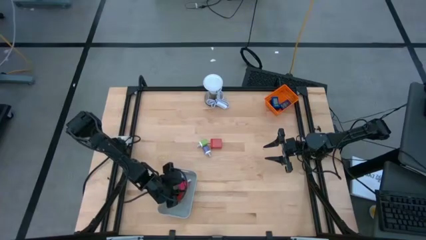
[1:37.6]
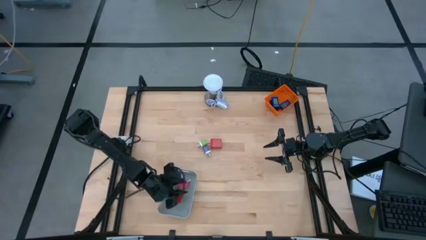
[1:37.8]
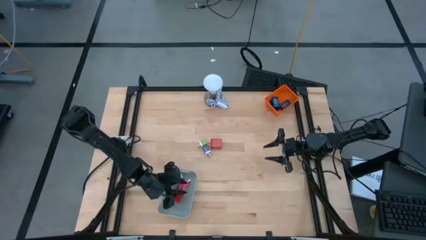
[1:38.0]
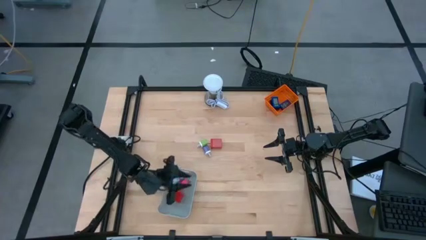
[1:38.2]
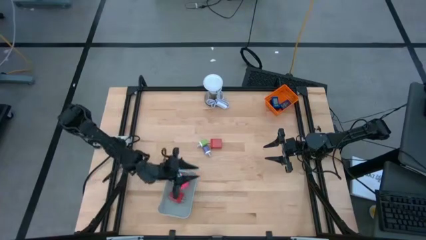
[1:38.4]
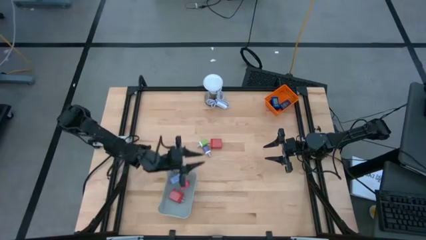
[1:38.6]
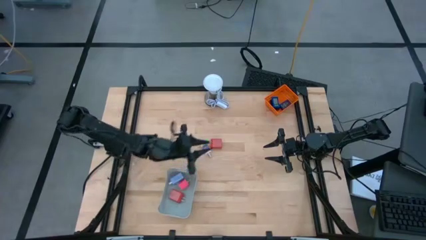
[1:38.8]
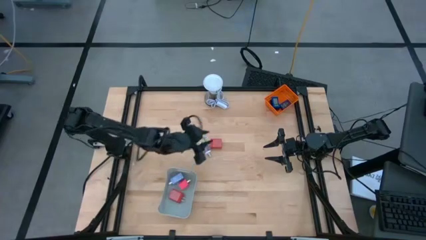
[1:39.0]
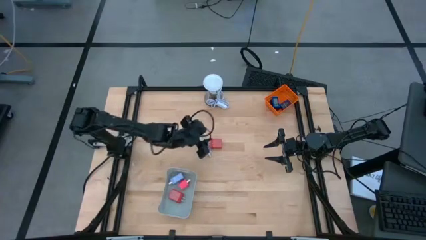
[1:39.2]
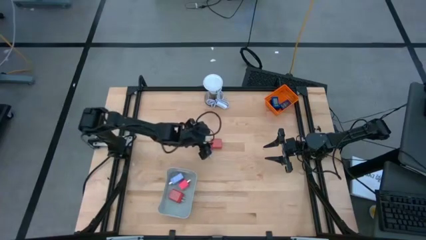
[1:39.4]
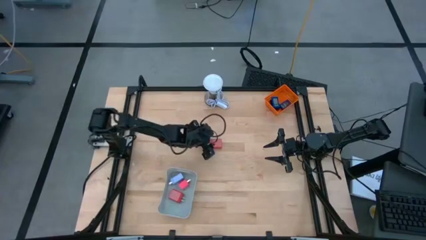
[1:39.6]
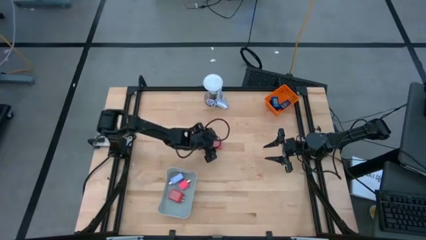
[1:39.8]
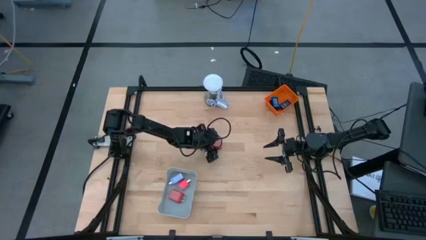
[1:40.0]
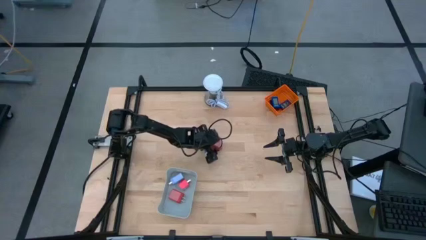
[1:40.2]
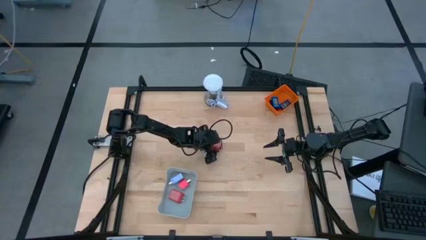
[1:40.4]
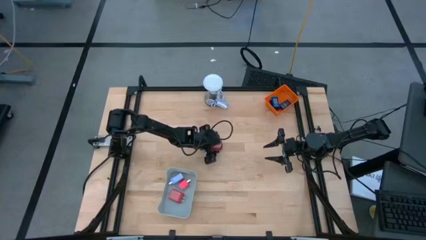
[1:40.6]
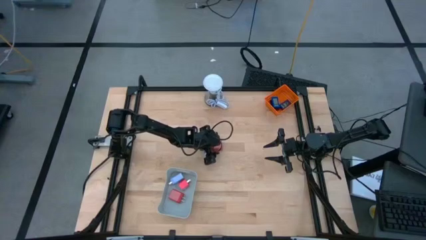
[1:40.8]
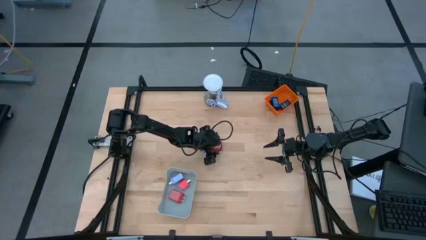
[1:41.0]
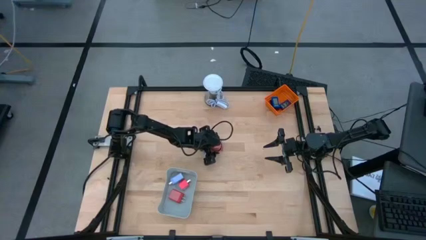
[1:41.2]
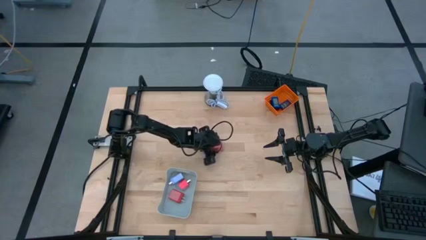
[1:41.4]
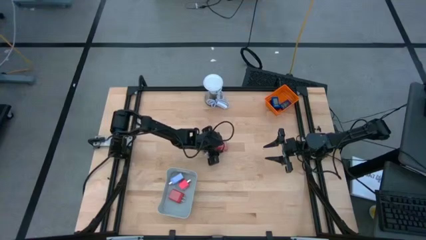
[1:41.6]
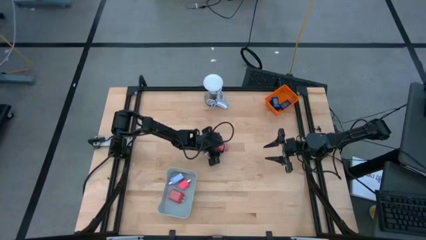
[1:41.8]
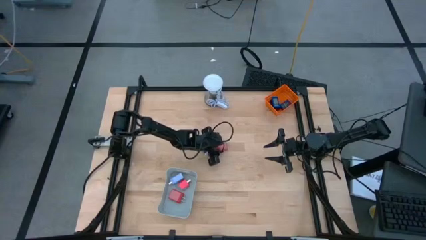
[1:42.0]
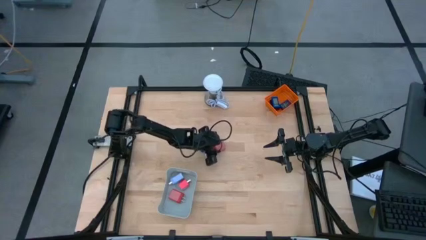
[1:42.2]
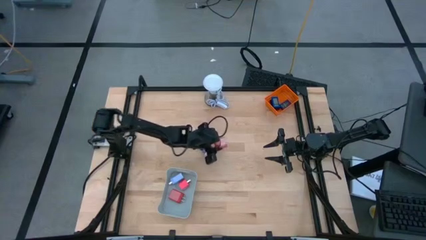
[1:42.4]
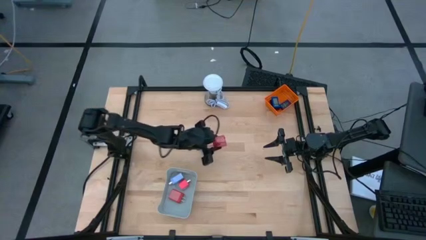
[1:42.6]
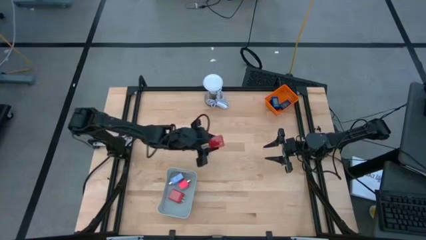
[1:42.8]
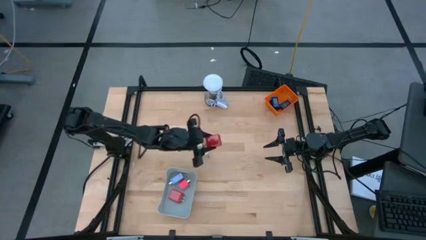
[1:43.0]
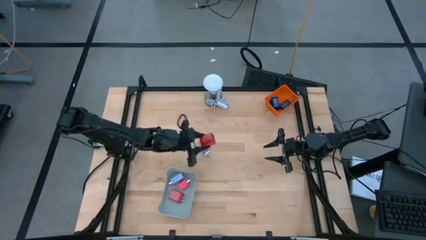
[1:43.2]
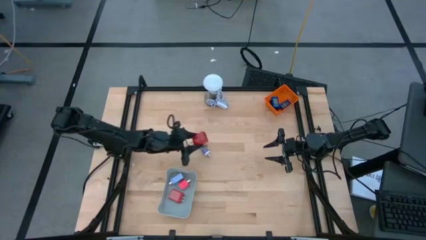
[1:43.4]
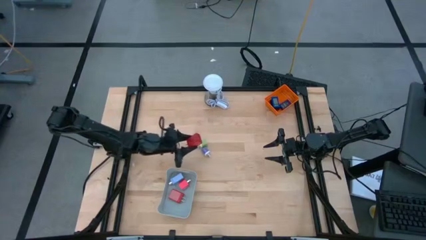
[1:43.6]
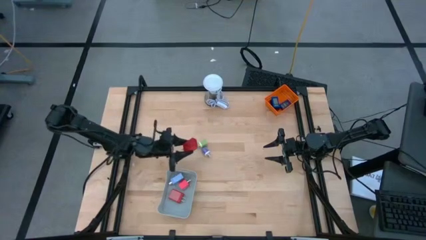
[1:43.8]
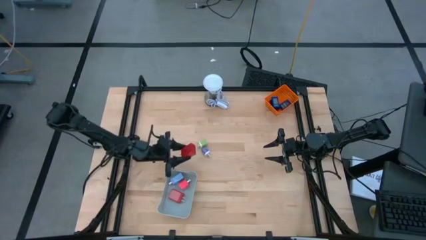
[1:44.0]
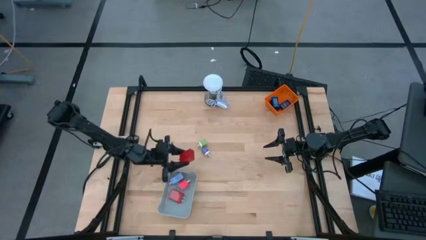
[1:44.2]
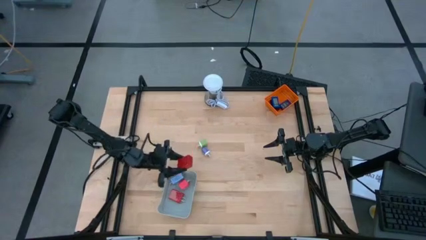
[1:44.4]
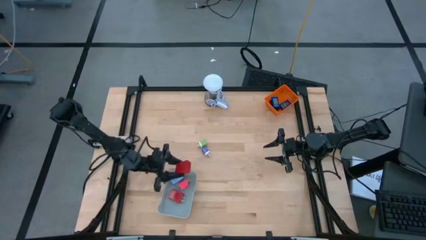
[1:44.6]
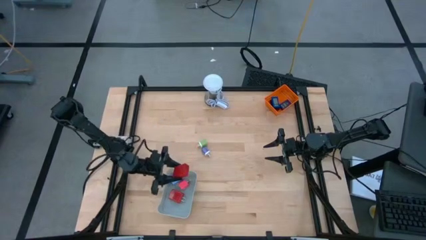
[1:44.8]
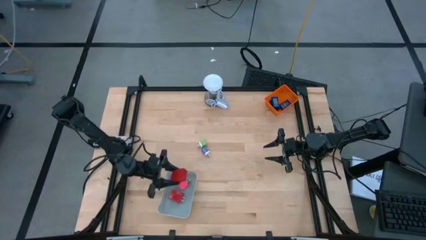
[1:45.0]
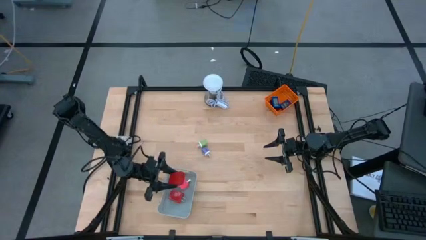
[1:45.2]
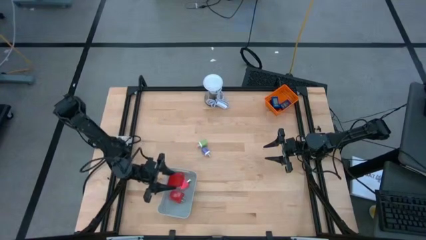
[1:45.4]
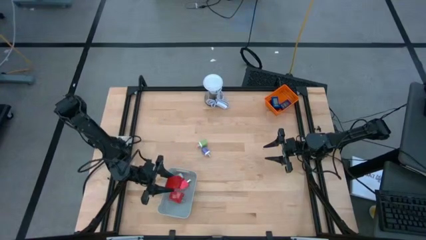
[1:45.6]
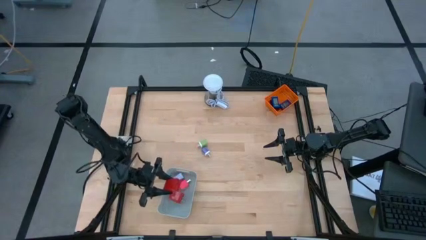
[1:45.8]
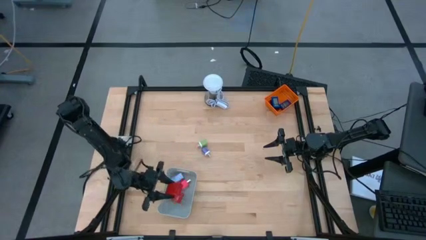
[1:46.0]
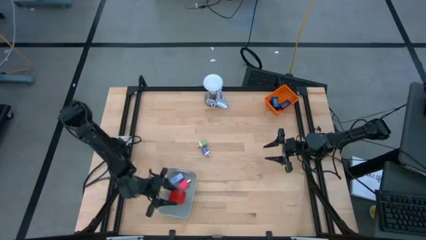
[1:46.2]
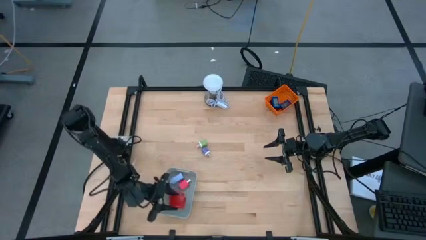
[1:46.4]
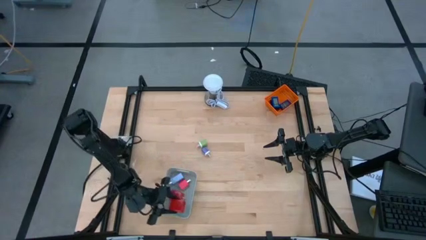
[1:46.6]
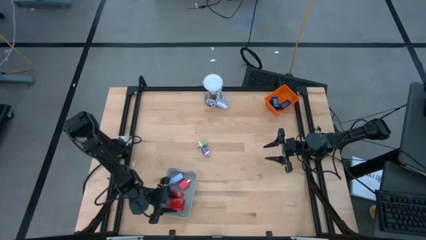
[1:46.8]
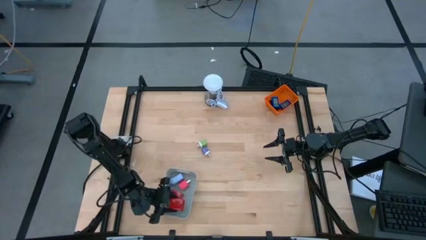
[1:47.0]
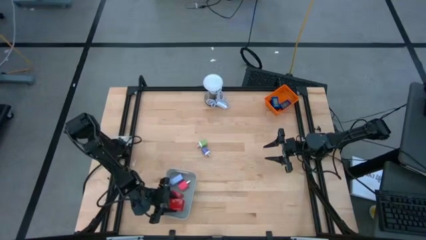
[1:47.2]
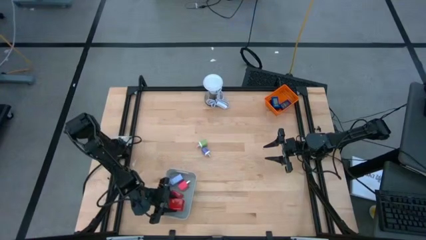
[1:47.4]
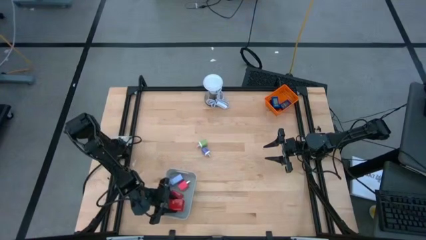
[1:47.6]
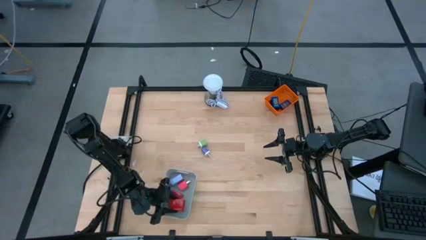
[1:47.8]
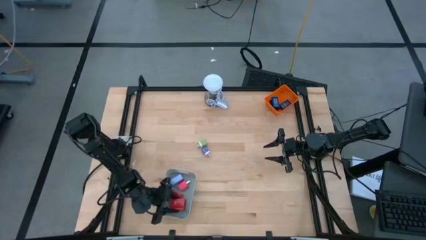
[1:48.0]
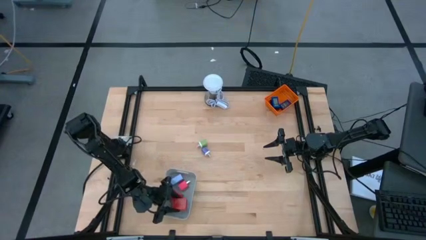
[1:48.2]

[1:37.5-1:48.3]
Task: Pick & Place Office items
Put the red charger adapter into the gray bin
